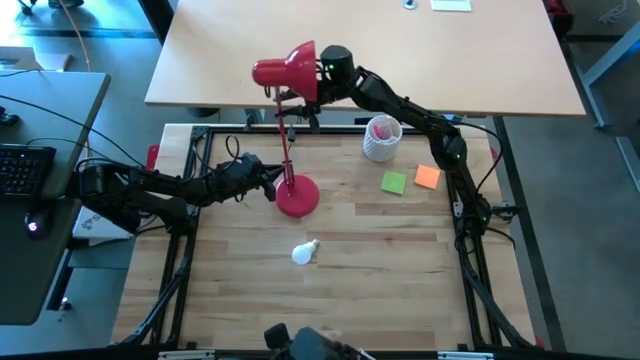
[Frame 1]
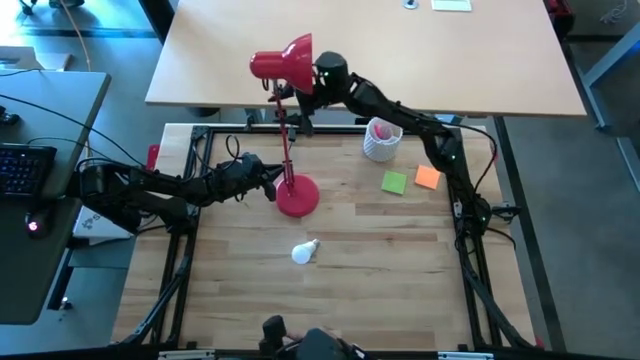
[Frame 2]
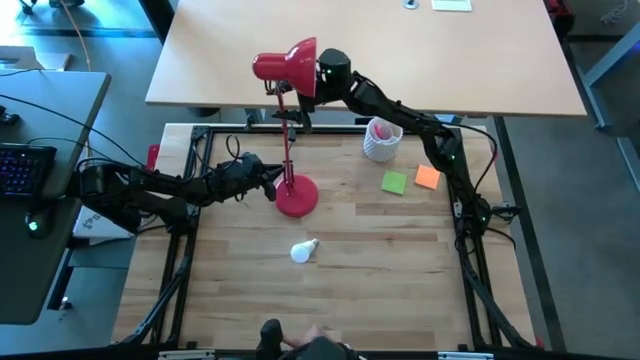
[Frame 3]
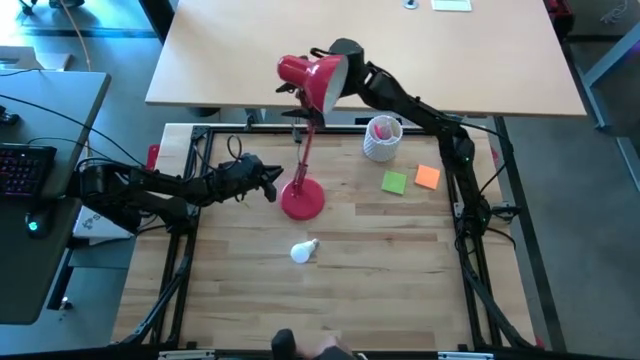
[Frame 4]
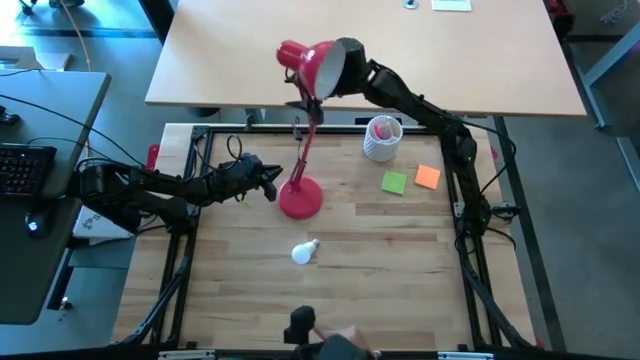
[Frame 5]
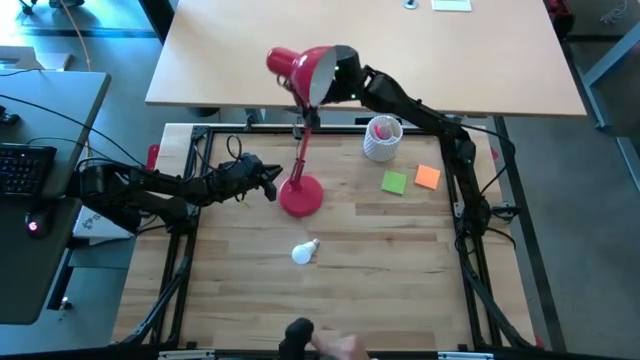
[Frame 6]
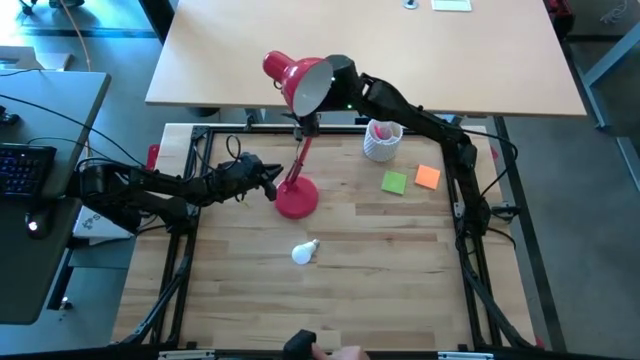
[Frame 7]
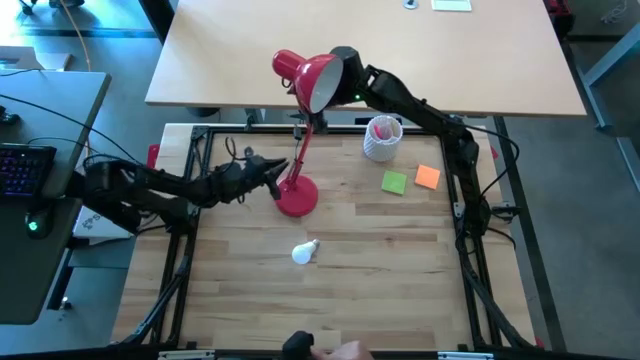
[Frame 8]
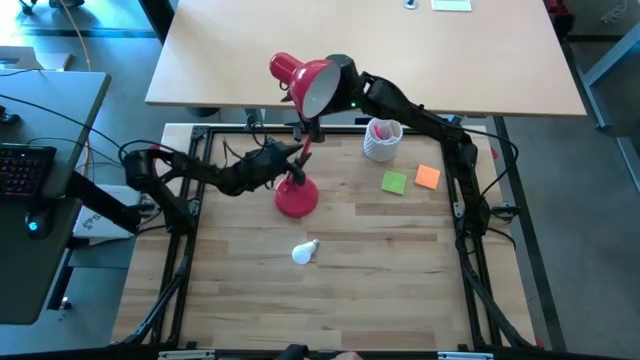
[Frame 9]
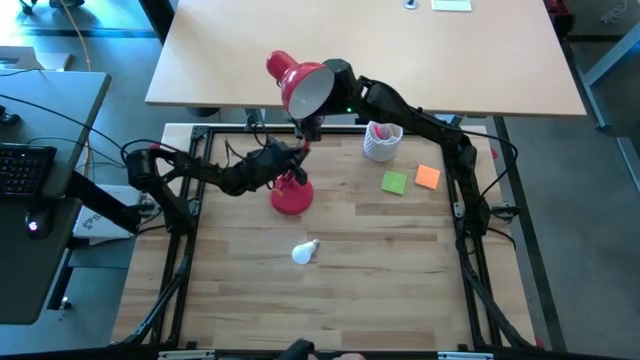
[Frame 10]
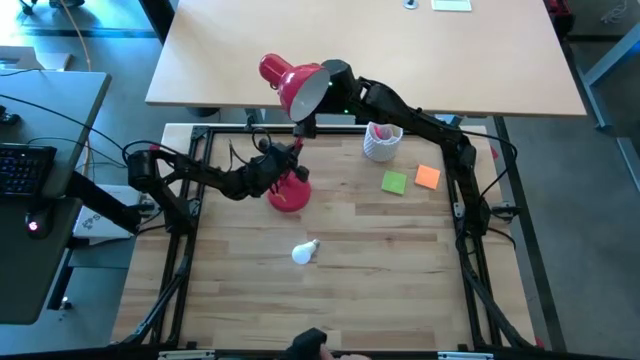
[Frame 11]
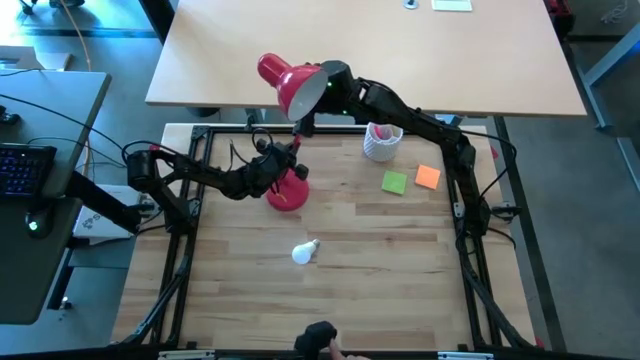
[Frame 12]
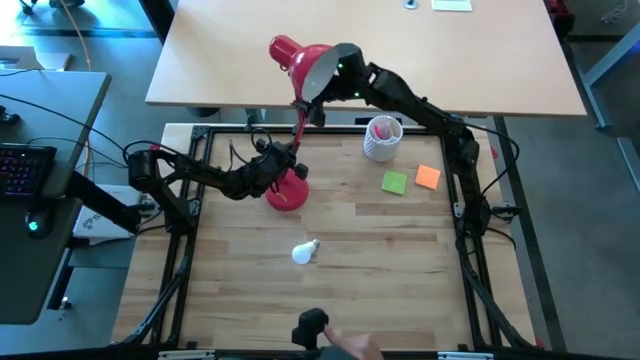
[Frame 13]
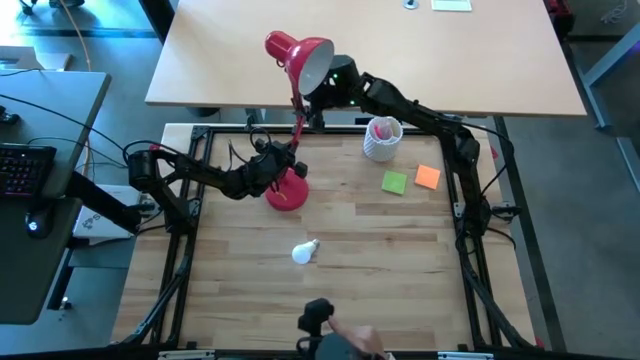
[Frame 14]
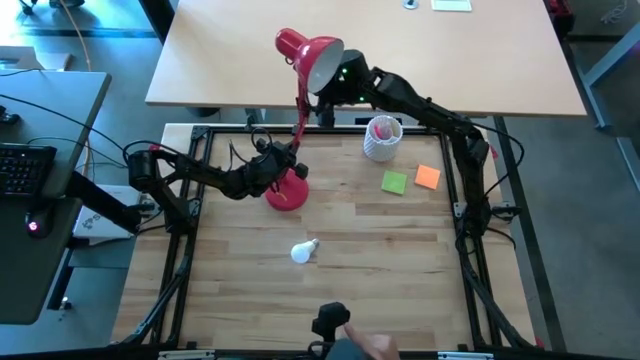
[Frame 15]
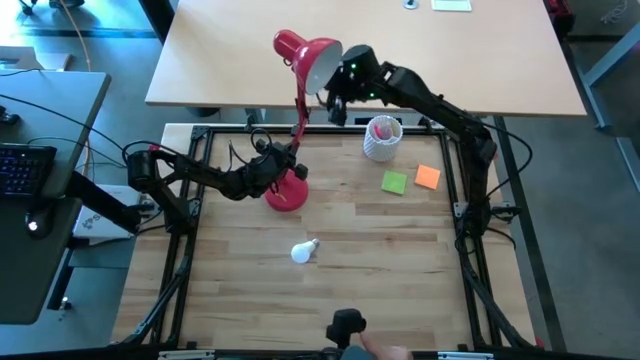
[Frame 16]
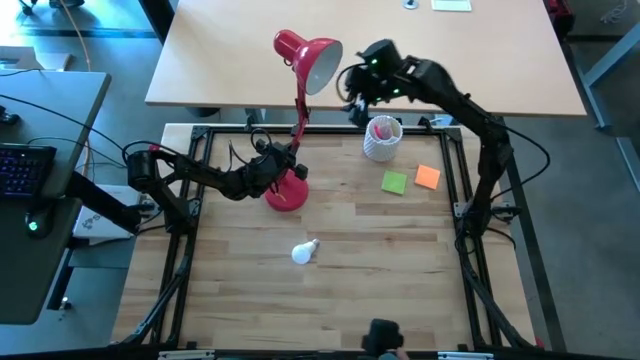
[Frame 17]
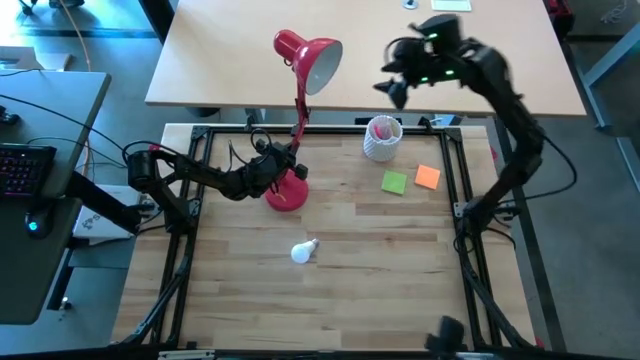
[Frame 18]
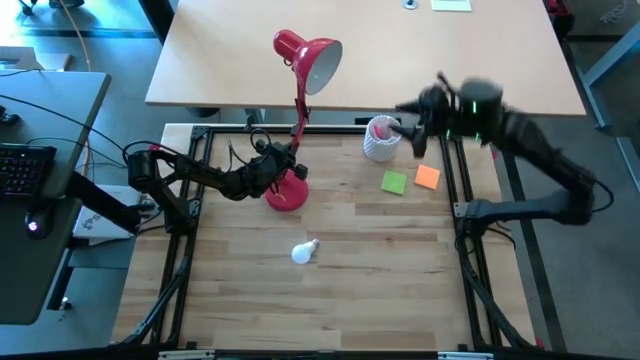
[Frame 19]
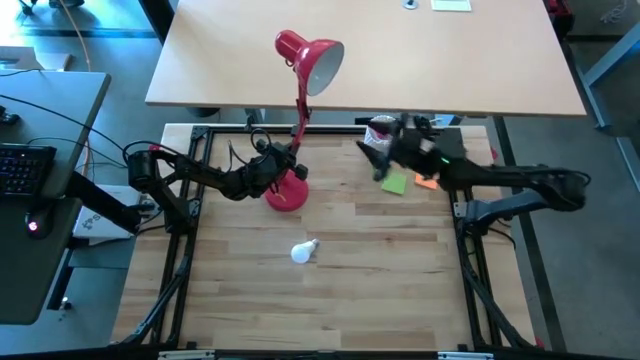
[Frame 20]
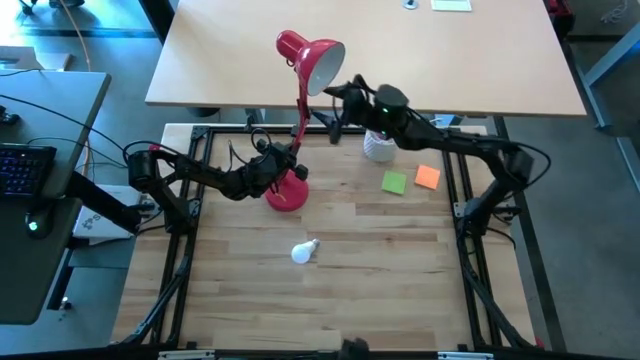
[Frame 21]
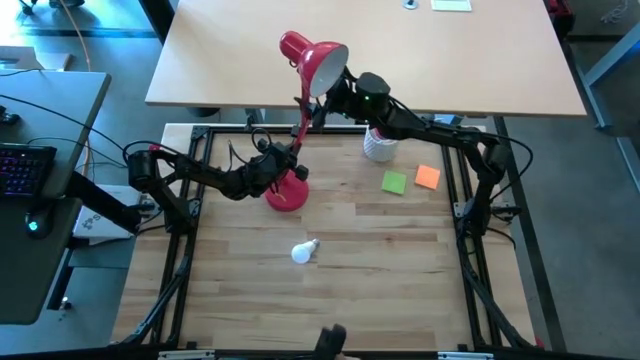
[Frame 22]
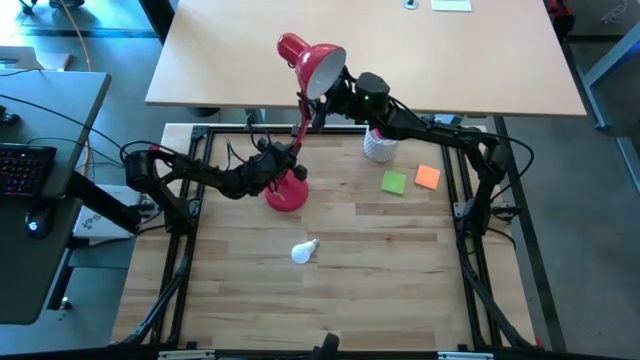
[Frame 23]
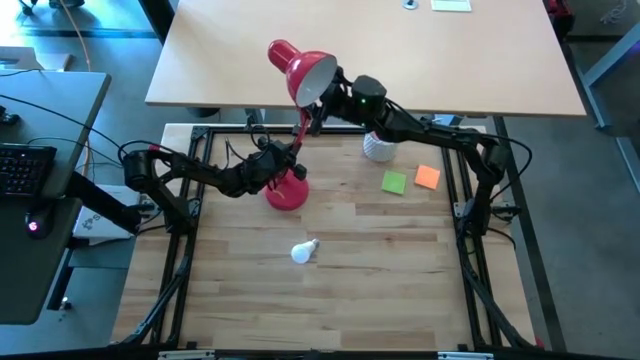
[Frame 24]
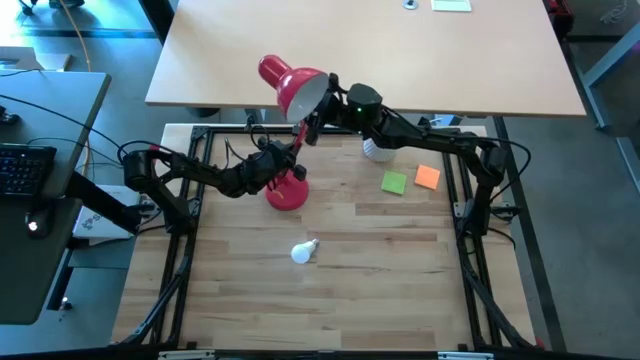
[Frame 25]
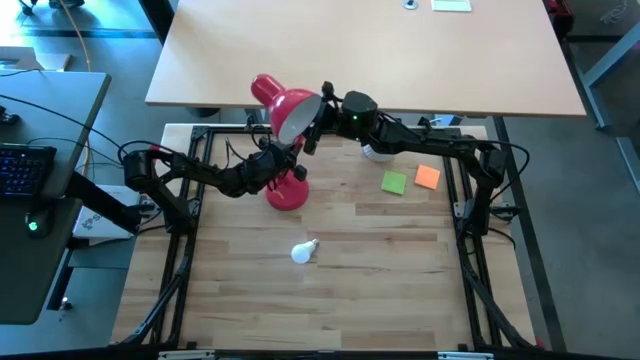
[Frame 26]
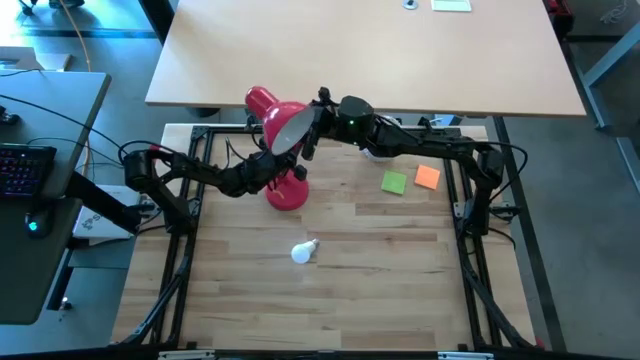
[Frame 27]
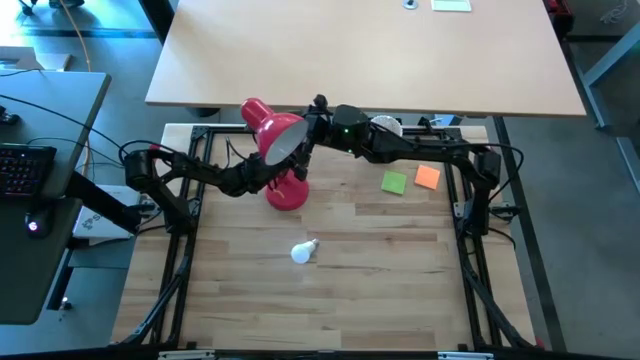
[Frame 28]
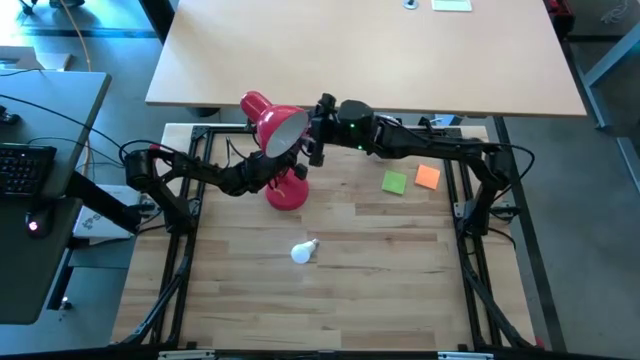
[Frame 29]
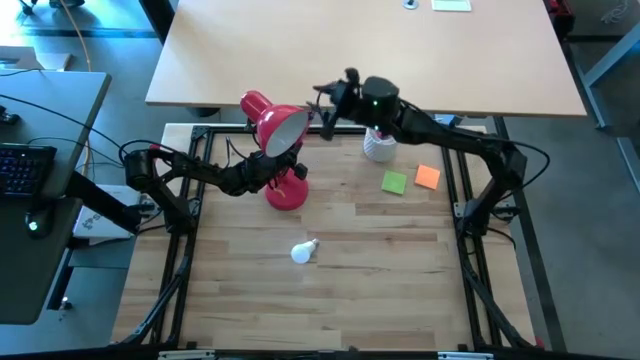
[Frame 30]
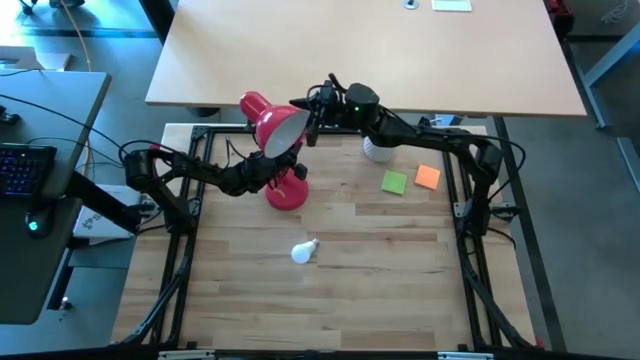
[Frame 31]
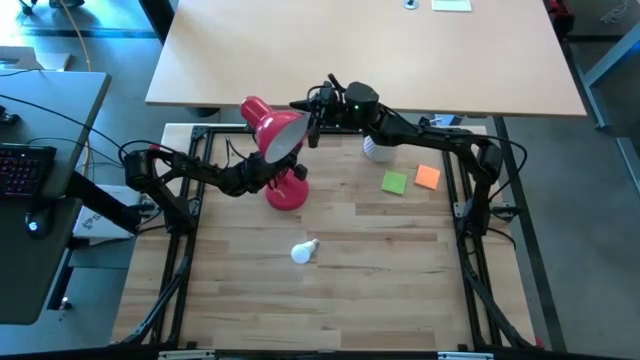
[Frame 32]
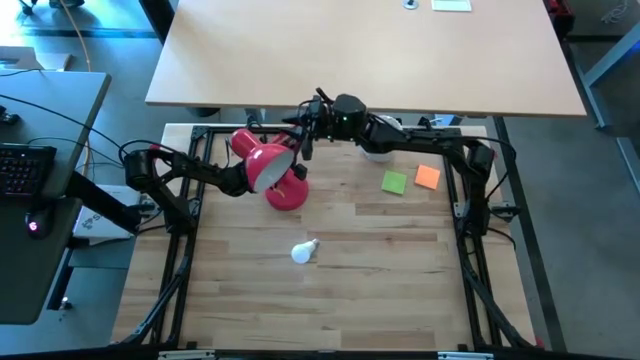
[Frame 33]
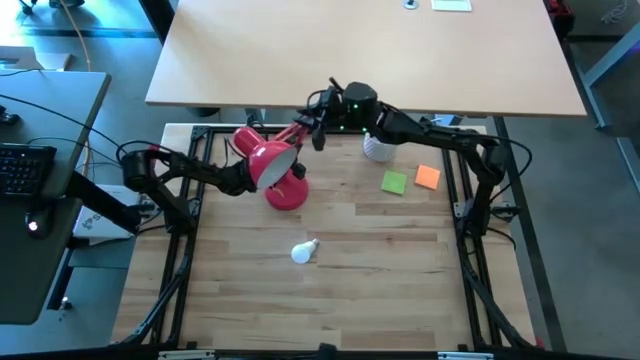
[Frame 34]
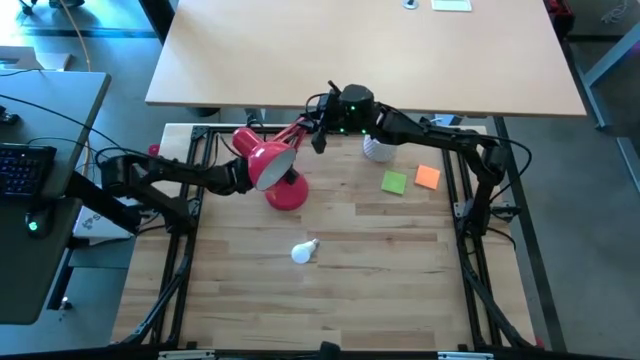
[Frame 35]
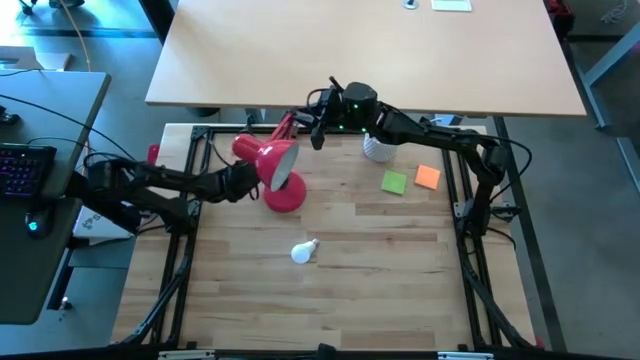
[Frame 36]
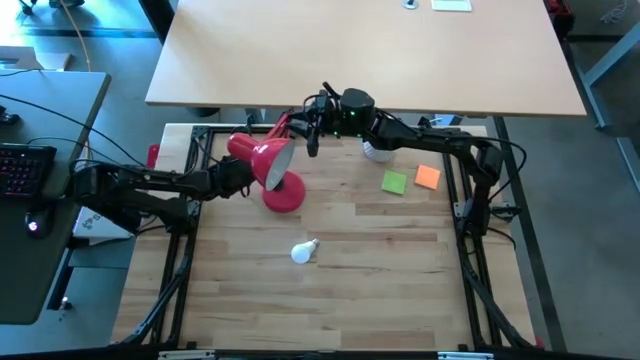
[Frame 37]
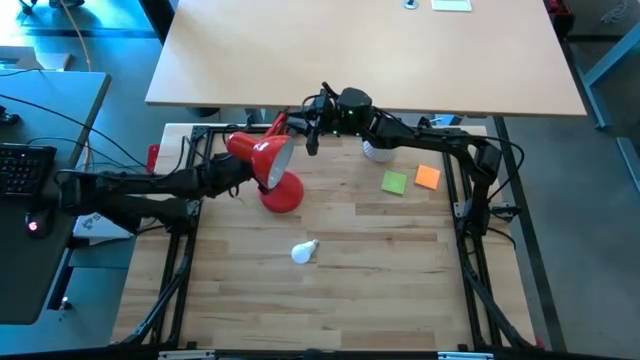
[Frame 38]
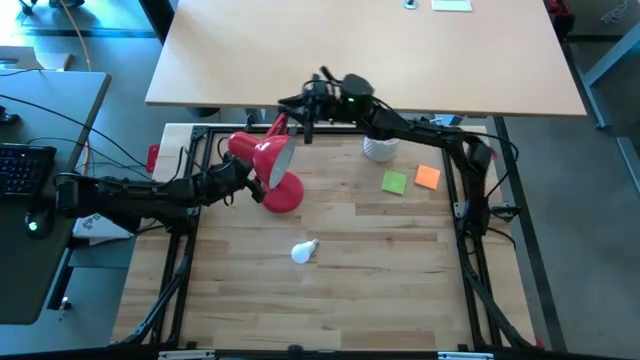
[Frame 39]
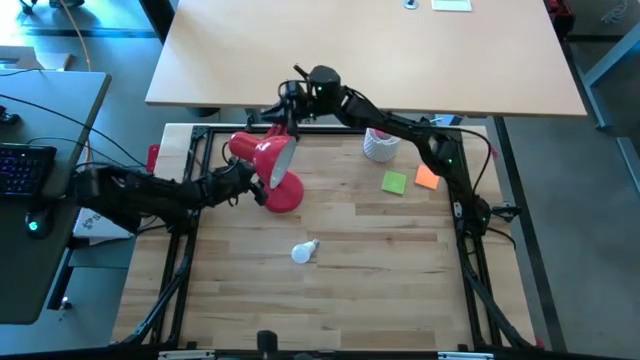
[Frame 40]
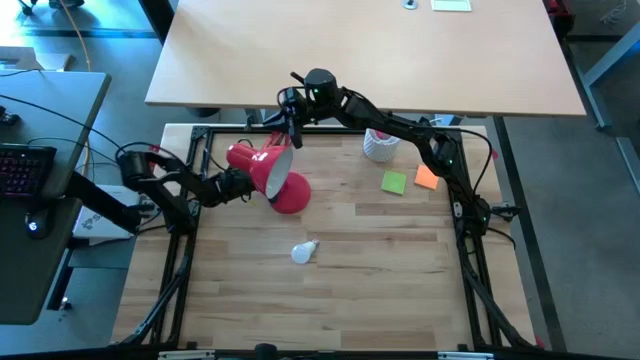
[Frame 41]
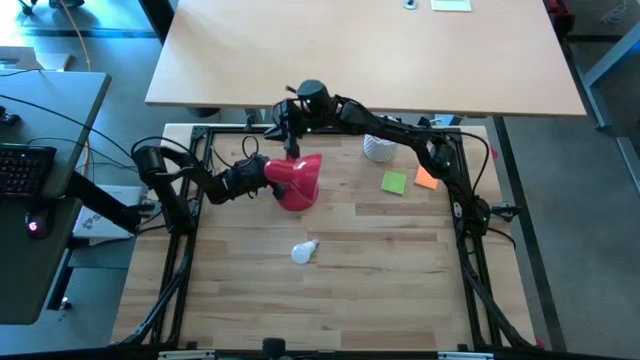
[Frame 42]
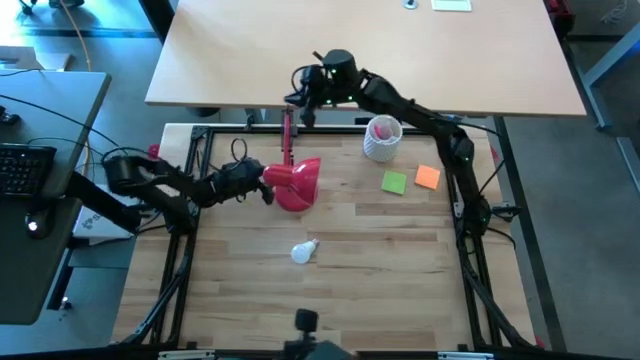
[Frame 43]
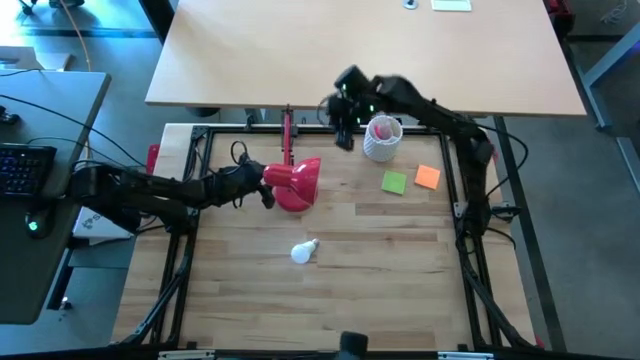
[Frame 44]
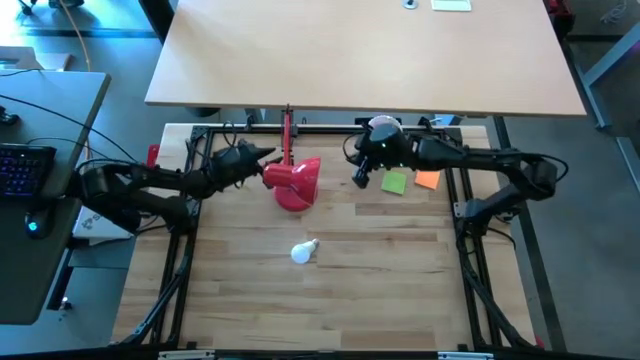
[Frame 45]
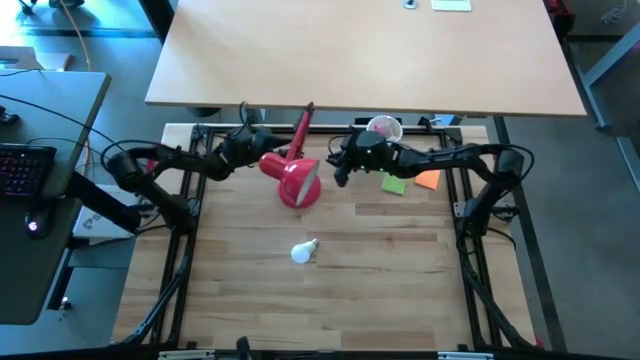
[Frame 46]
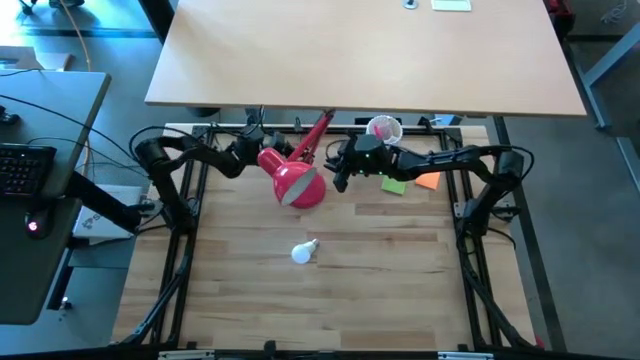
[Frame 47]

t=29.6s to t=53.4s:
Task: Screw lightbulb
Adjust the red lamp
